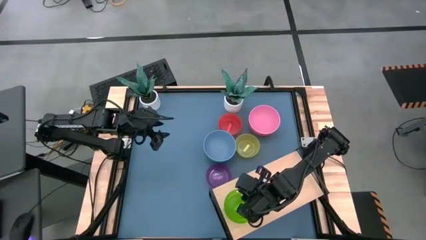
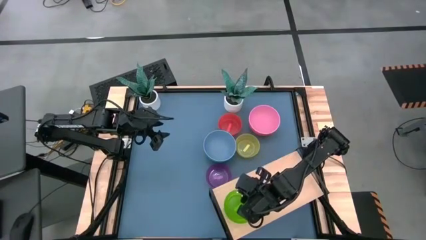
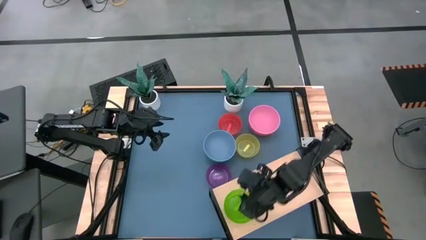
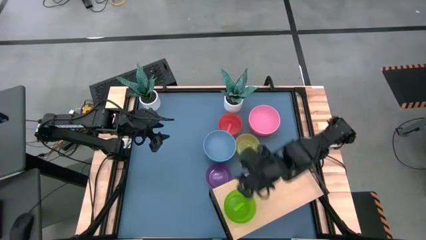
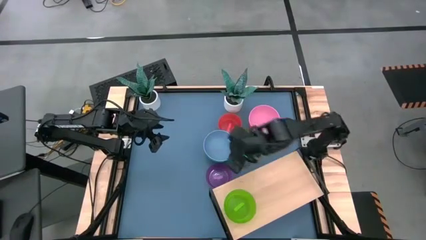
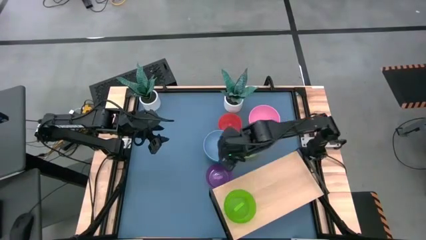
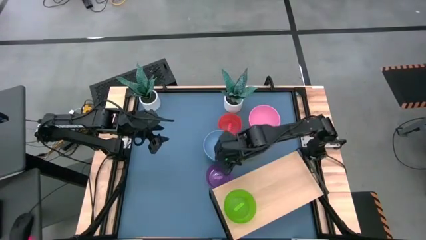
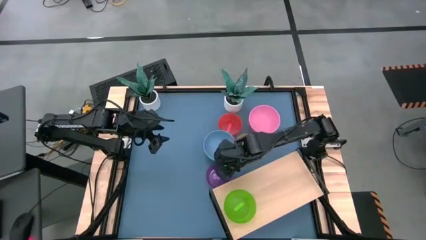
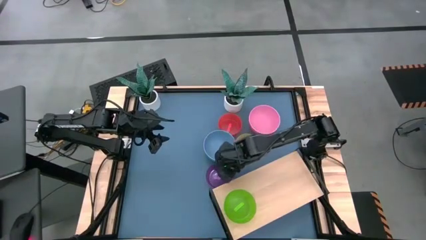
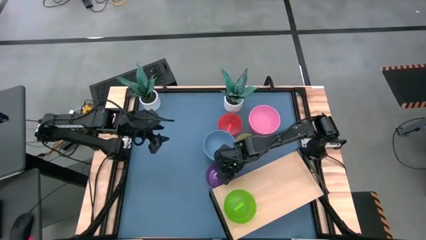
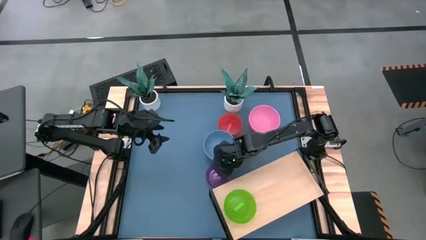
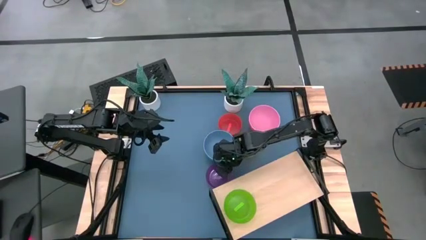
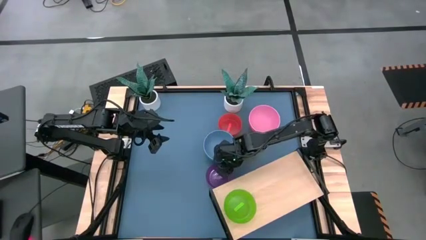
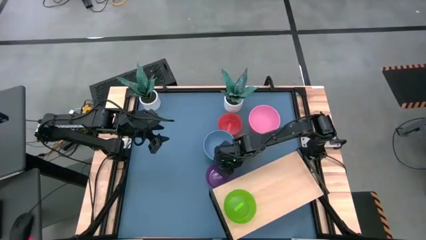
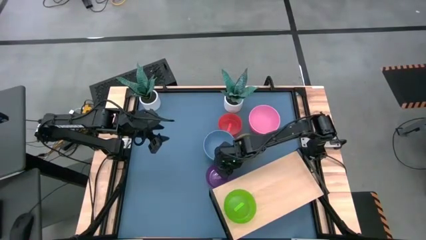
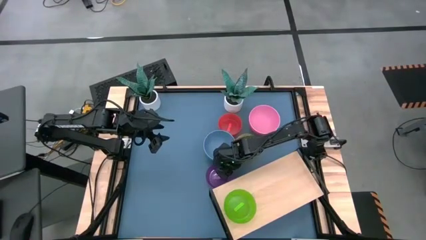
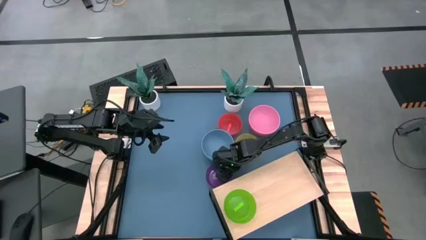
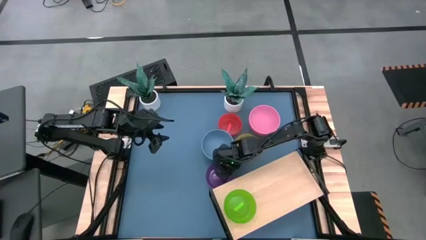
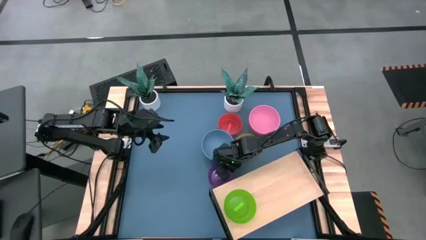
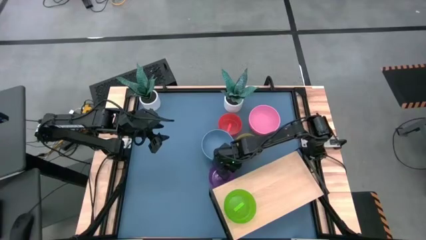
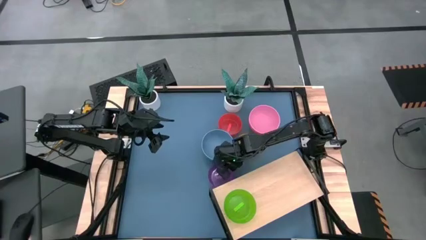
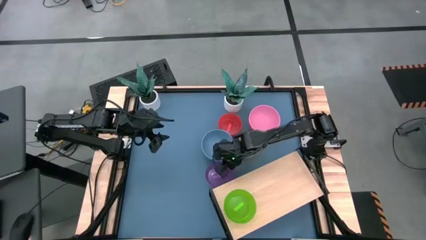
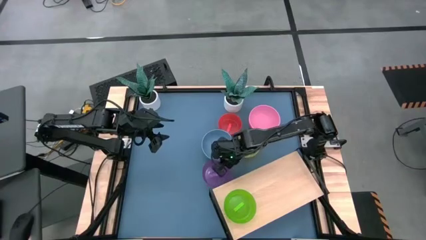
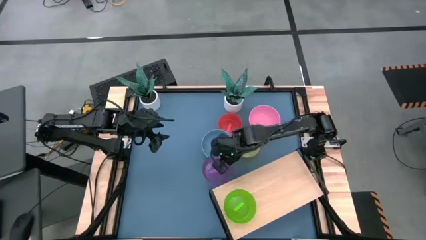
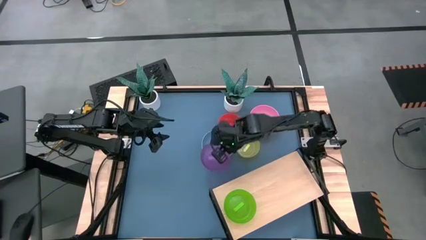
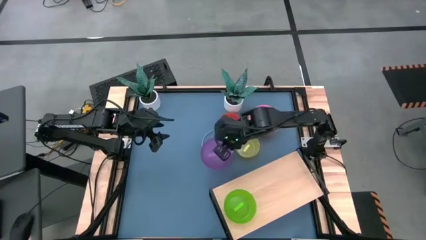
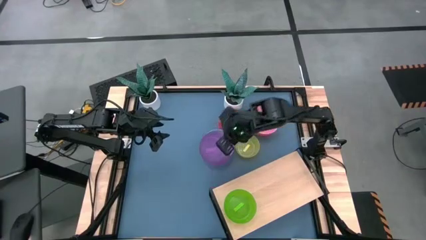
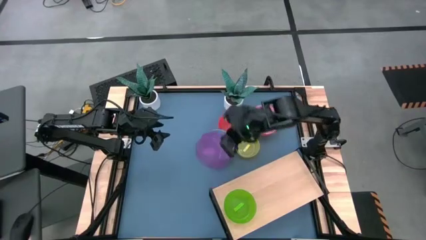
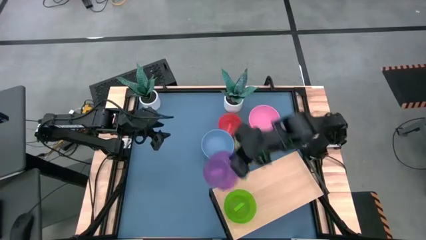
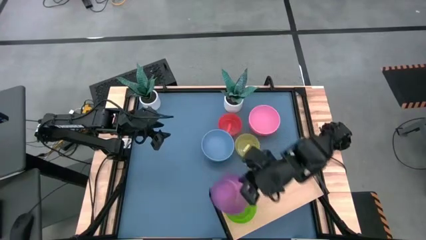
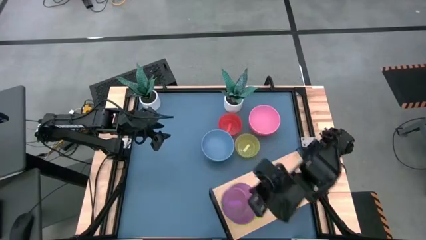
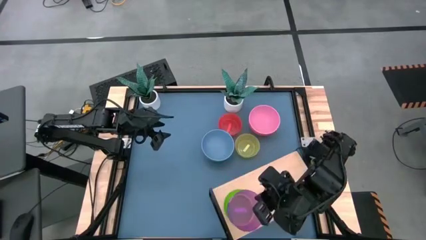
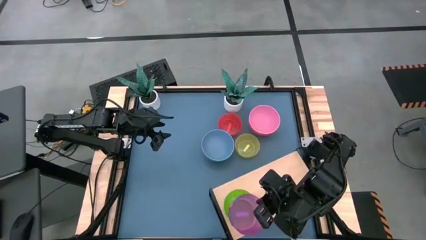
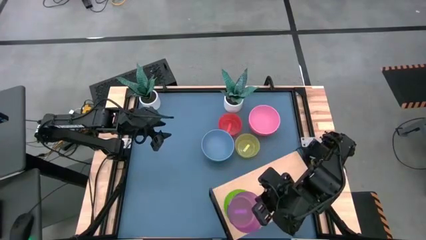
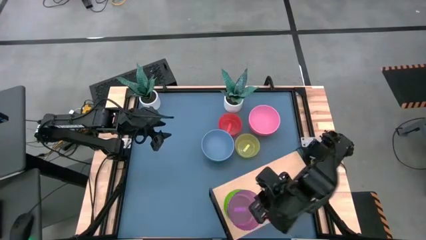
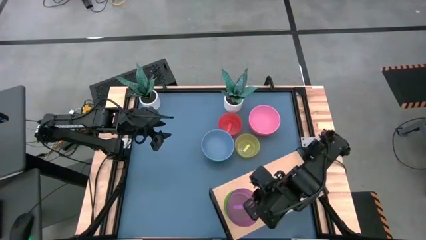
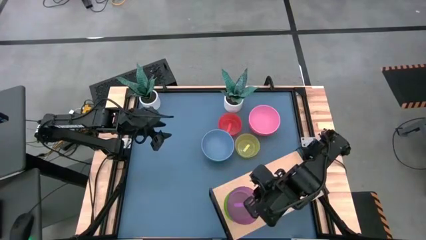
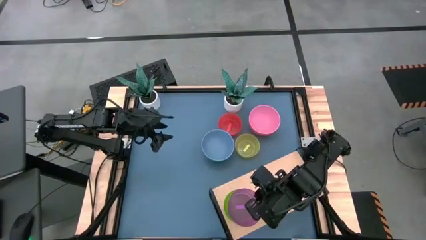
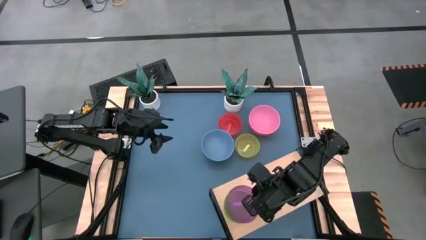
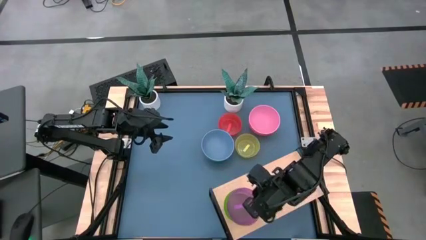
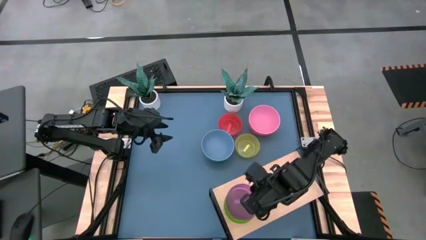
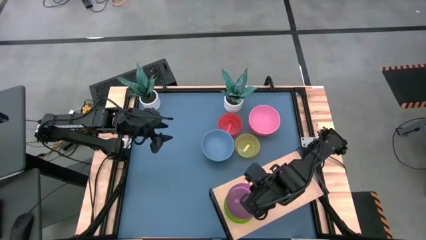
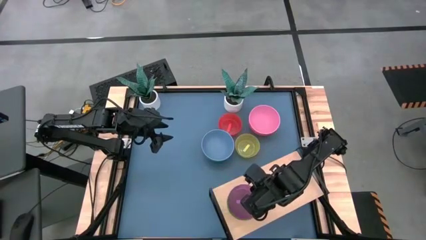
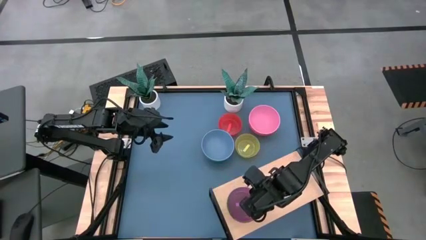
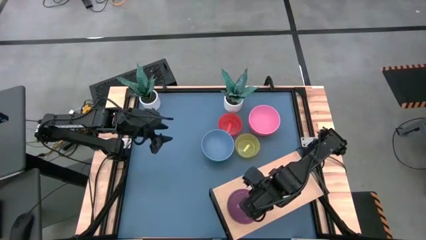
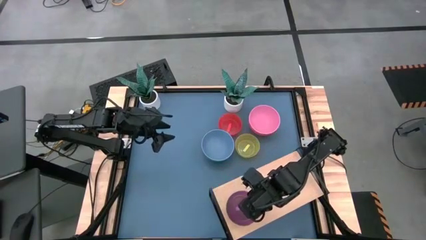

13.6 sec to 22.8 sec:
Task: Place and stack bowls onto a shelf
Stack the purple bowl on top of the green bowl on the shelf

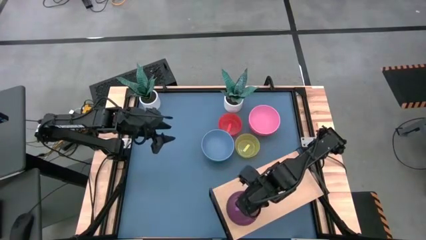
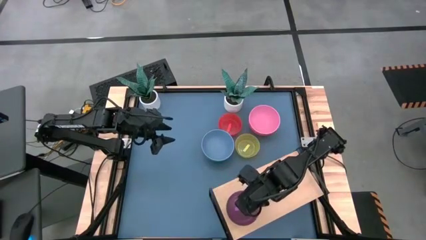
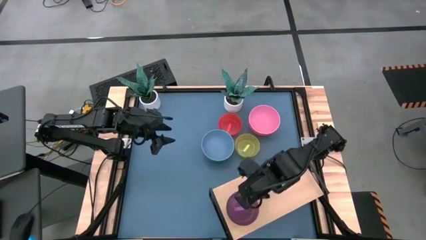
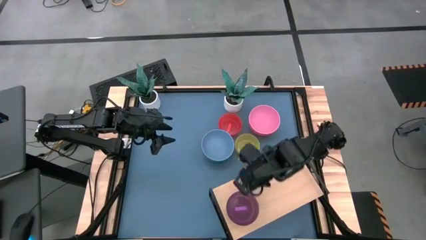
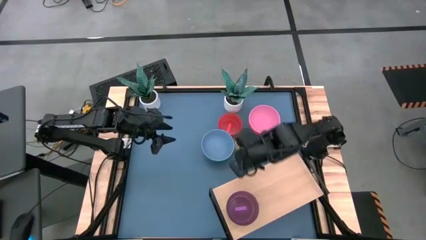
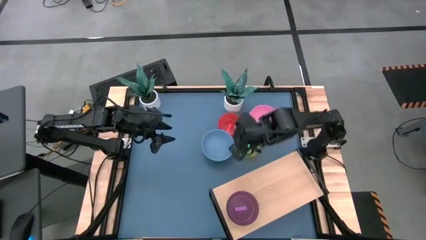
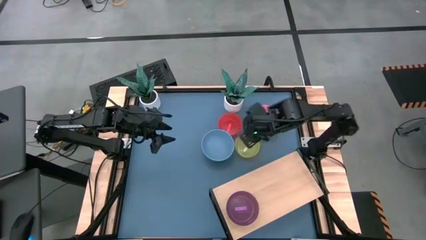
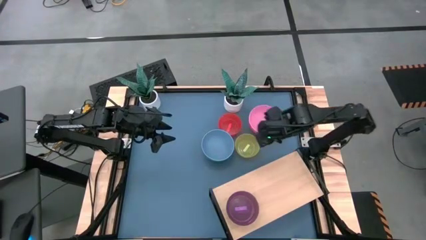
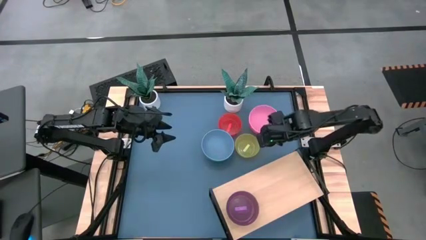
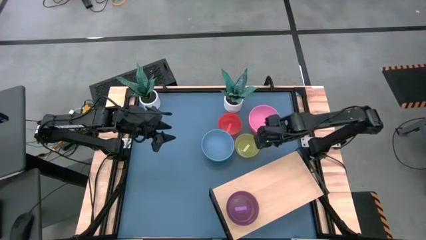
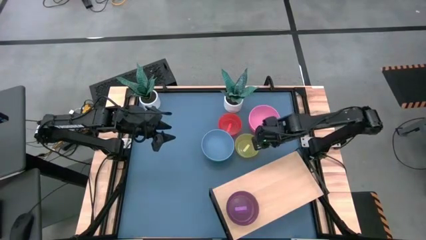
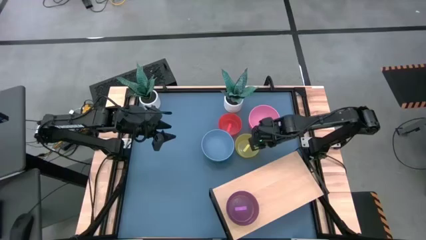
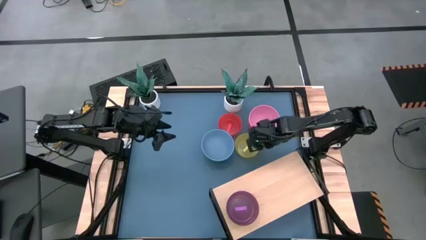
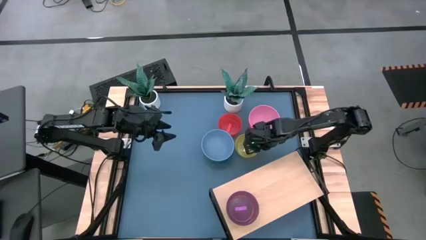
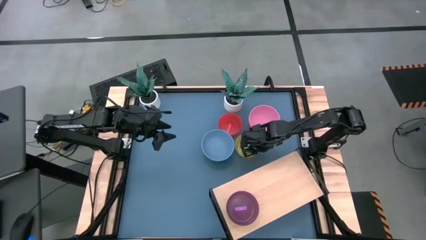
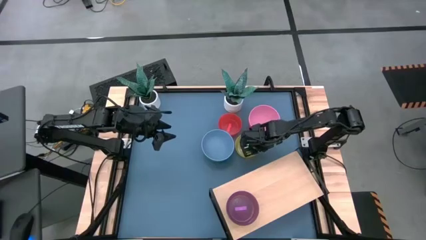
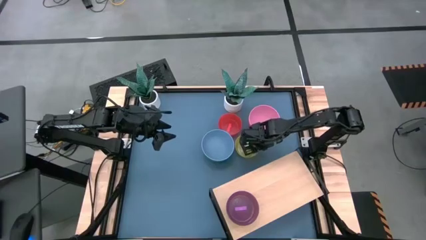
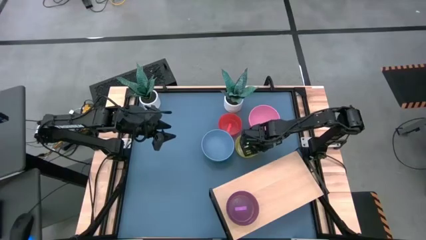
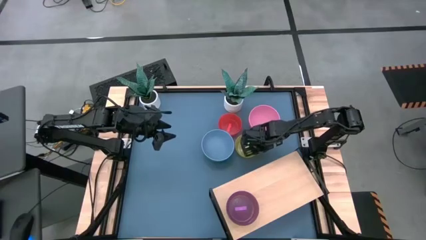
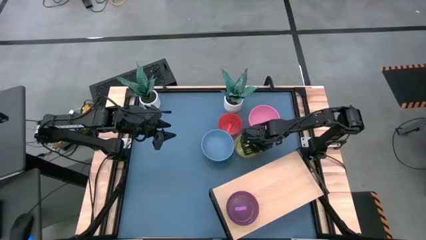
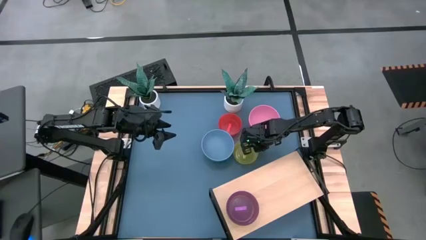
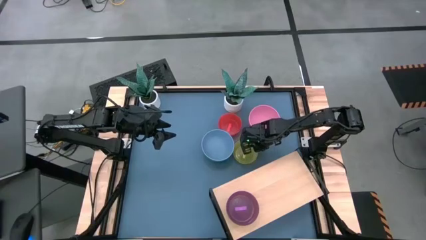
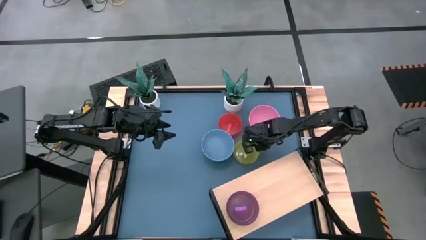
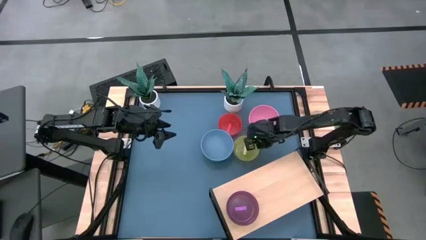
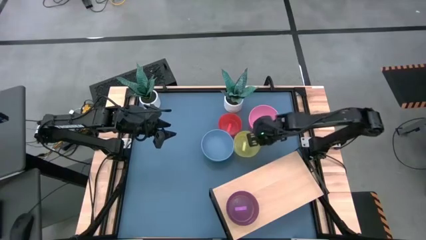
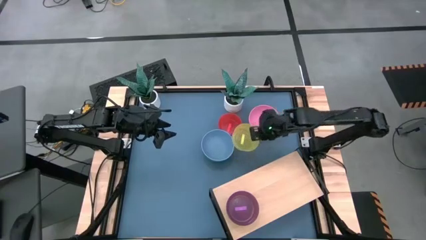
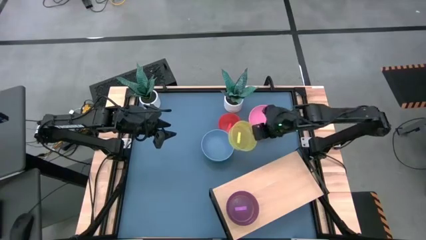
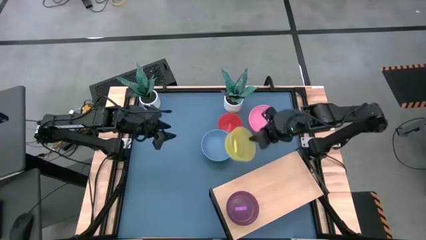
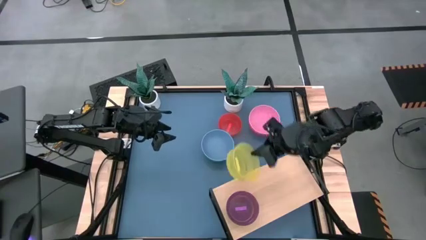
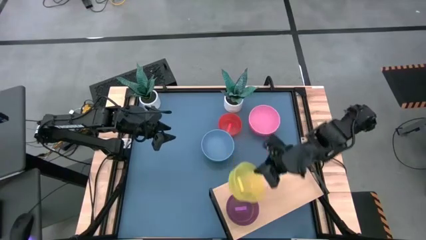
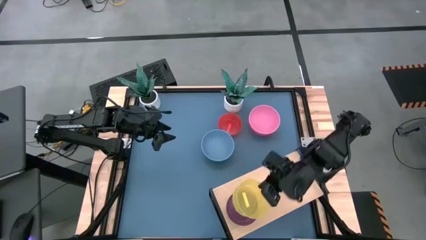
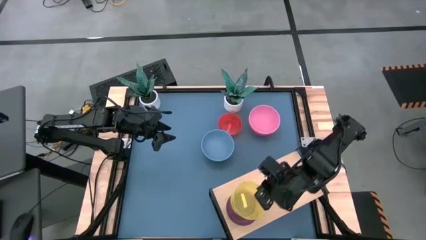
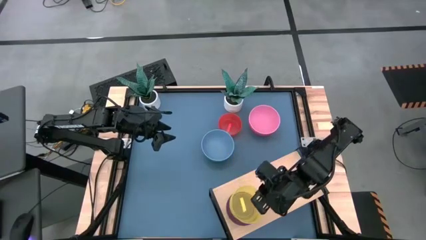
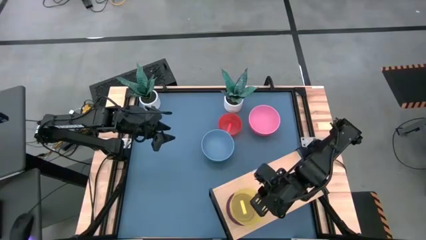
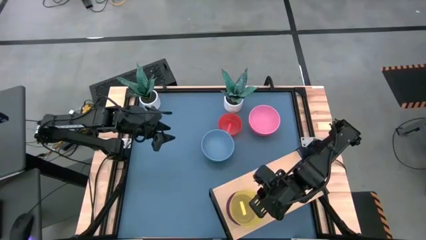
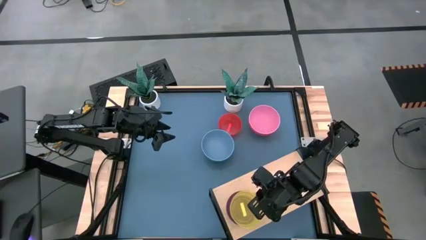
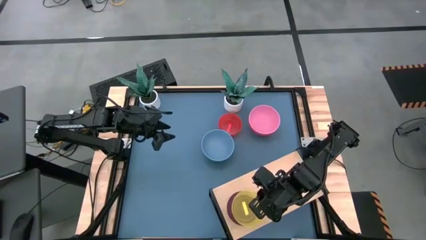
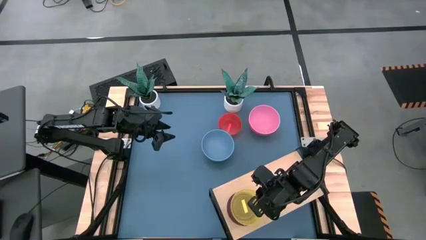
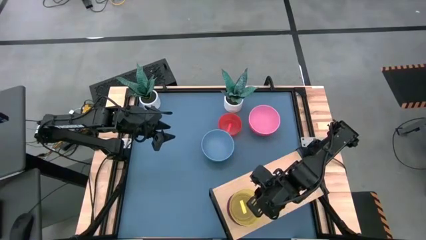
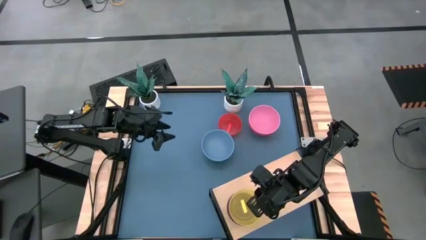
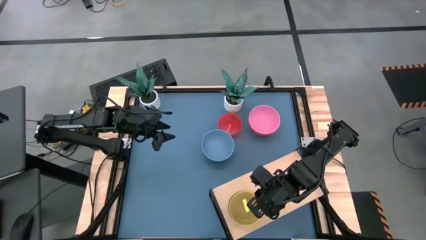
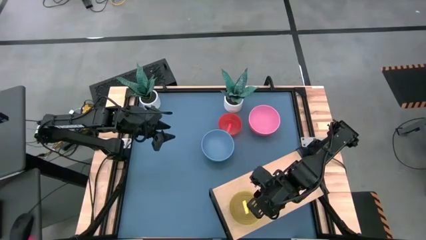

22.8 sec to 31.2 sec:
Stack the yellow bowl on the top of the purple bowl on the shelf
